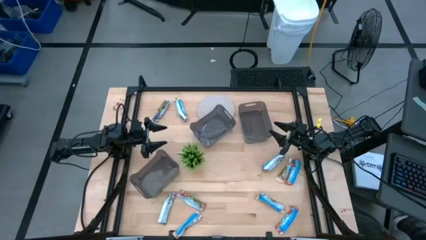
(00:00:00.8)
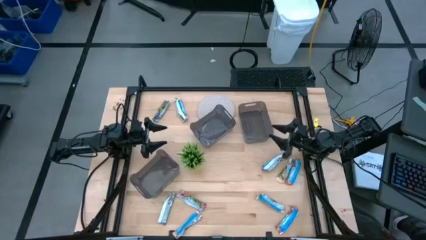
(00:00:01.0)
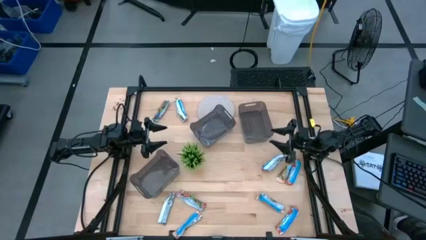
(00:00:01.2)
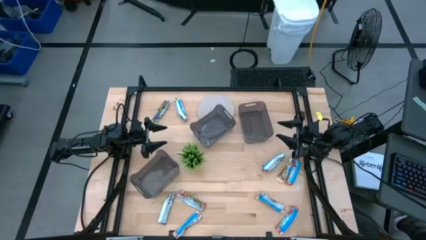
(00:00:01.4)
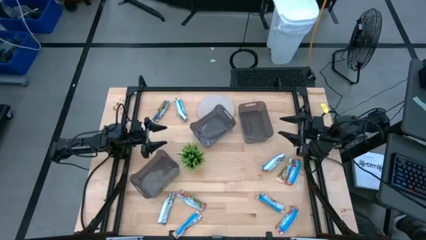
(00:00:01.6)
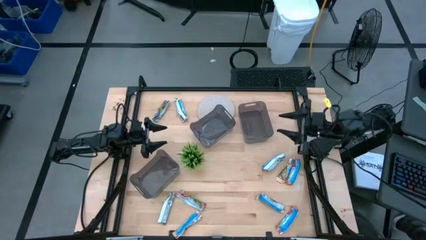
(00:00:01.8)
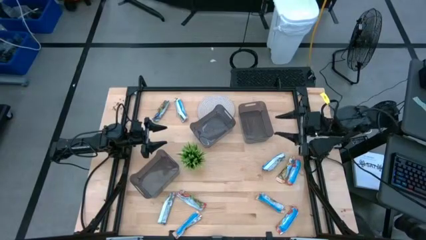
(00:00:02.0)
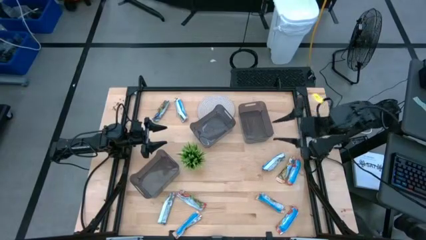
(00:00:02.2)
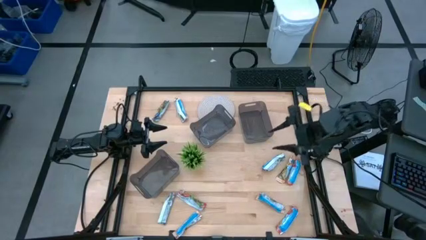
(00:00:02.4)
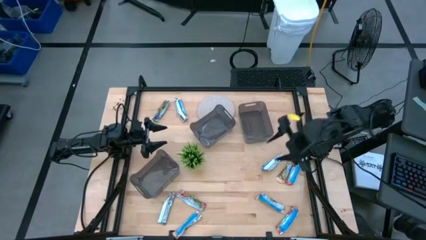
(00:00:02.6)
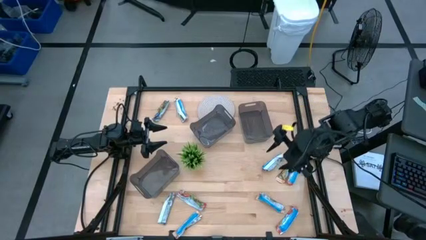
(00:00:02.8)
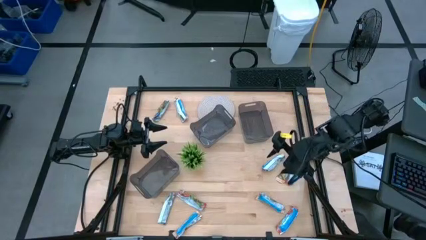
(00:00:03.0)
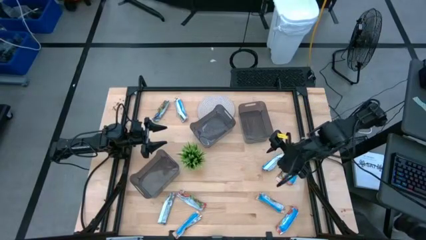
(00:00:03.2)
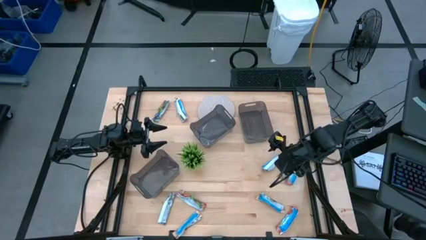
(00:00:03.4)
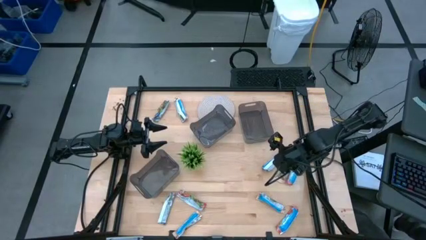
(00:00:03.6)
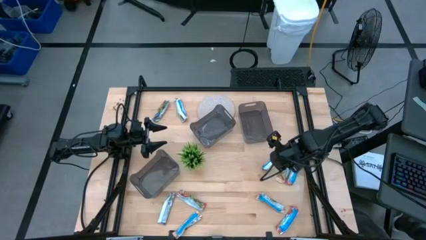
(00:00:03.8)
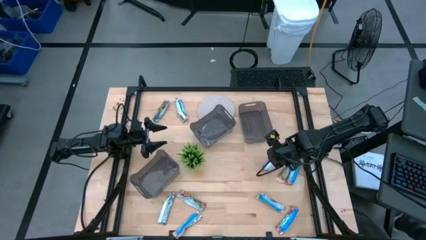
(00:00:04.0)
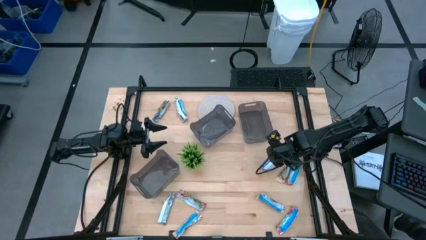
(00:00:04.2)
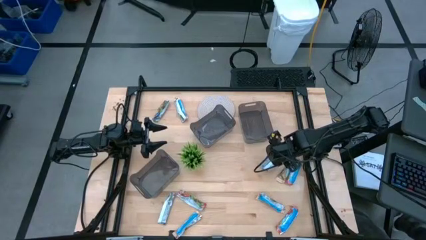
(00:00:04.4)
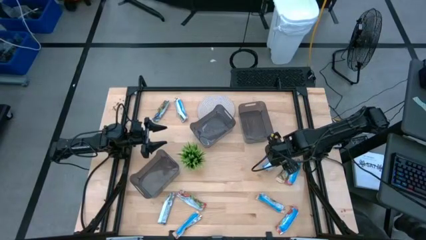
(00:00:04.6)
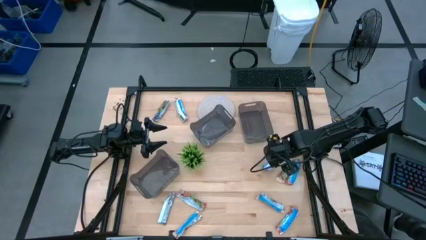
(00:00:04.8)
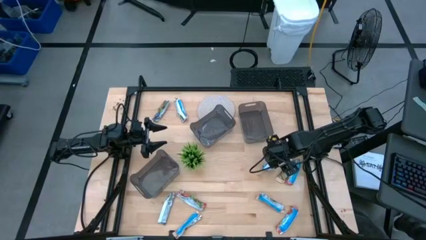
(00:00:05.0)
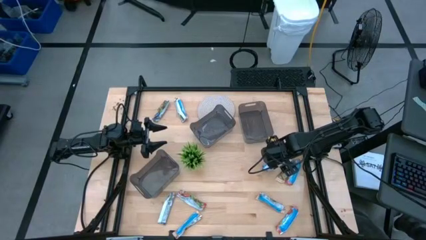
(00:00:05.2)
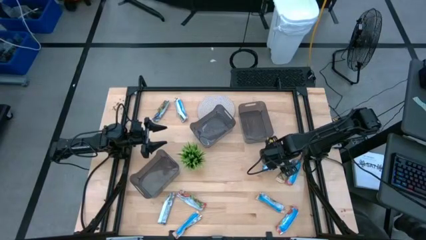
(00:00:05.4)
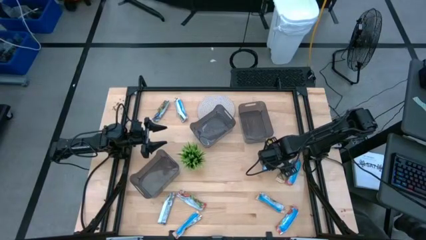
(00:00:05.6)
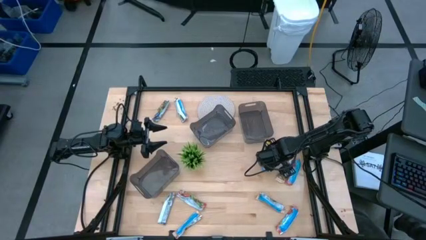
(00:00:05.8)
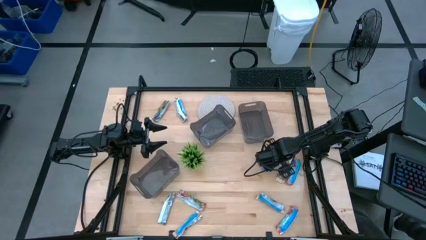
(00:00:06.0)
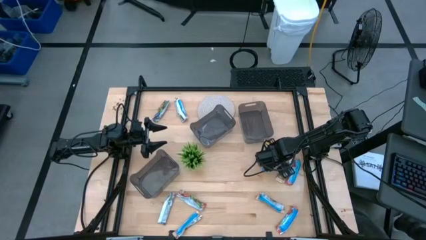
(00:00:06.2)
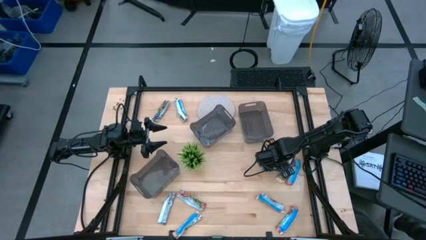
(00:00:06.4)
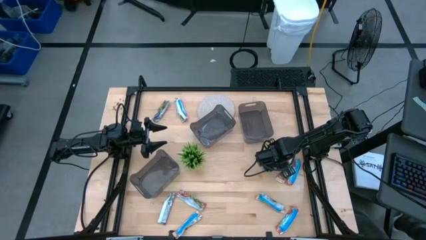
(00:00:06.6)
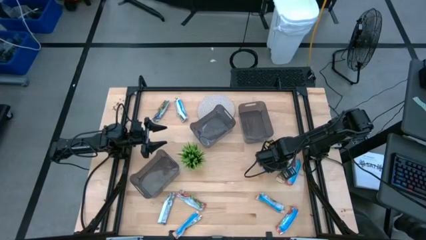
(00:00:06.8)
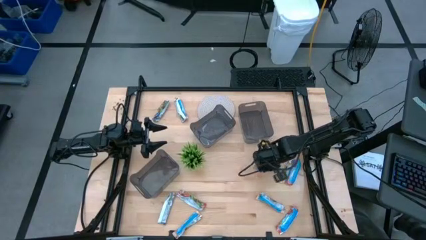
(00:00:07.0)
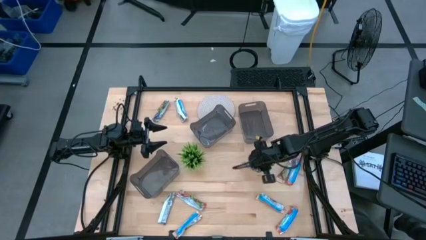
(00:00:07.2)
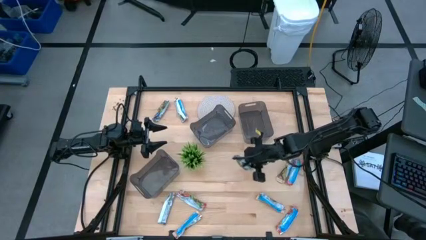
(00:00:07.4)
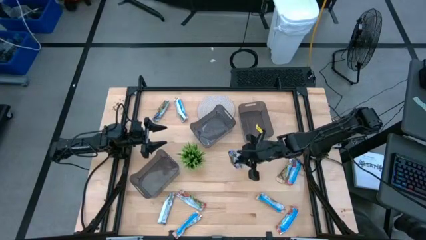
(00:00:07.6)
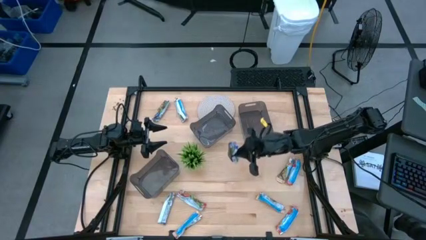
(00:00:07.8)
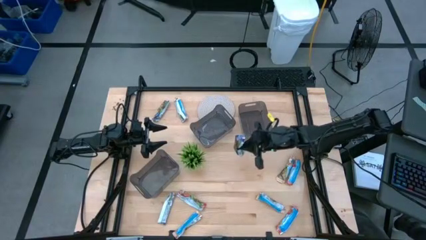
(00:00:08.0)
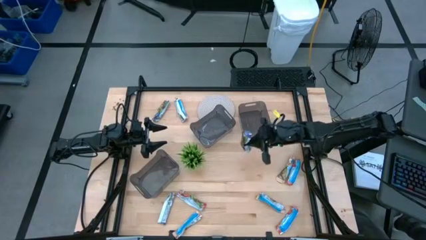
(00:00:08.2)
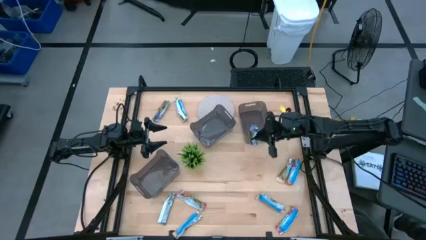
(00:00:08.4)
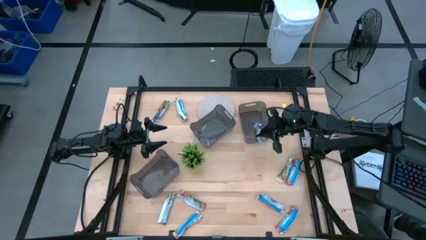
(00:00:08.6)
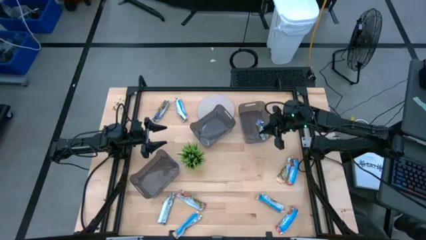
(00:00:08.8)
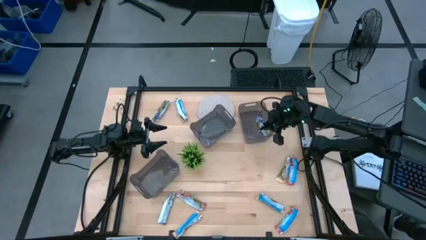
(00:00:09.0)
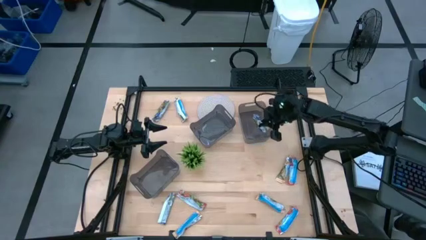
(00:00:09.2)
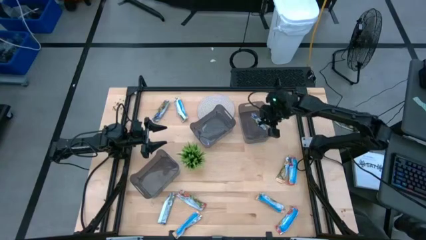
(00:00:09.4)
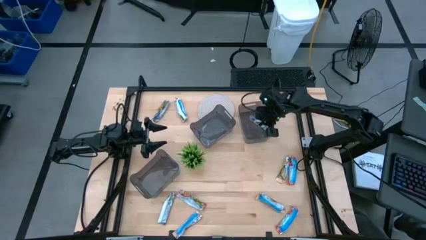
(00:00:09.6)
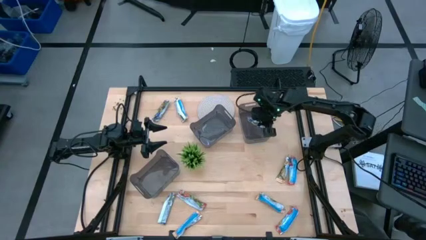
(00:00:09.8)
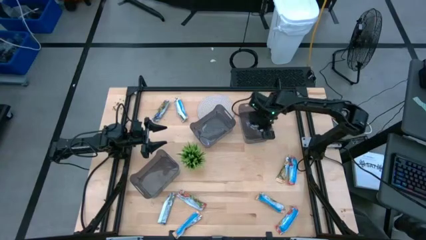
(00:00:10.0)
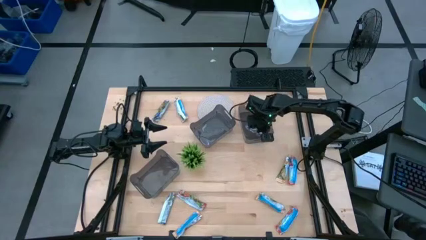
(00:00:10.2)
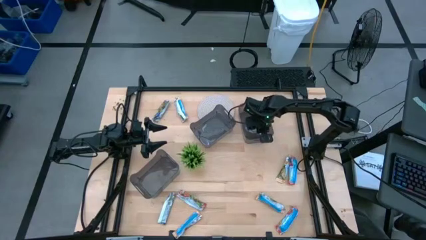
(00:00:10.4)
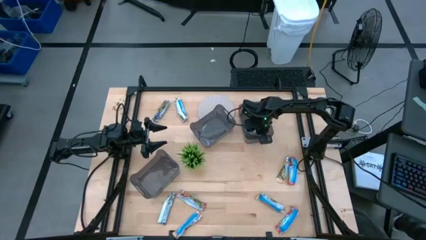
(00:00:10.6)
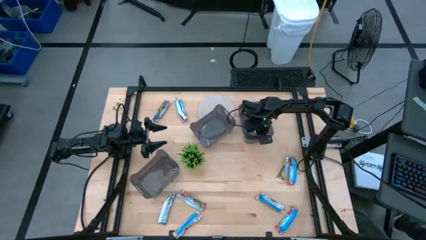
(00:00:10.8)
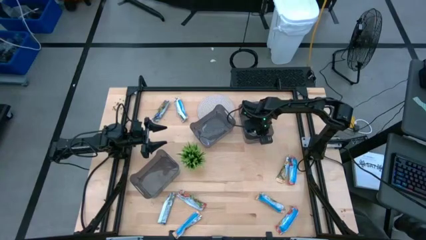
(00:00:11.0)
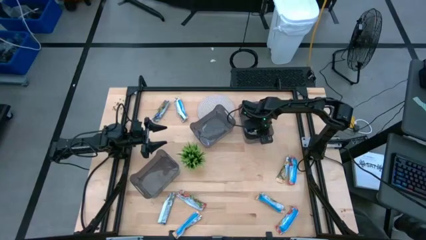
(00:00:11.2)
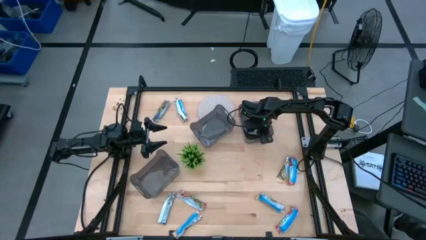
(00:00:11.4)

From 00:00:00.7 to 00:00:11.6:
Task: Pick and place Granola Bars by type
Put the blue granola bar into the top right black bin
